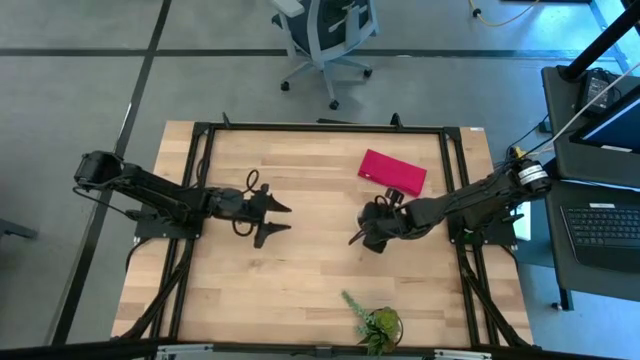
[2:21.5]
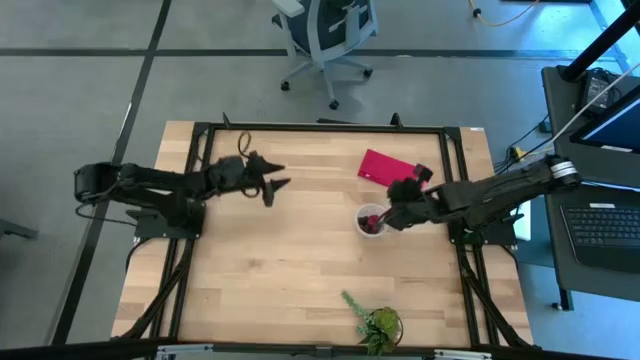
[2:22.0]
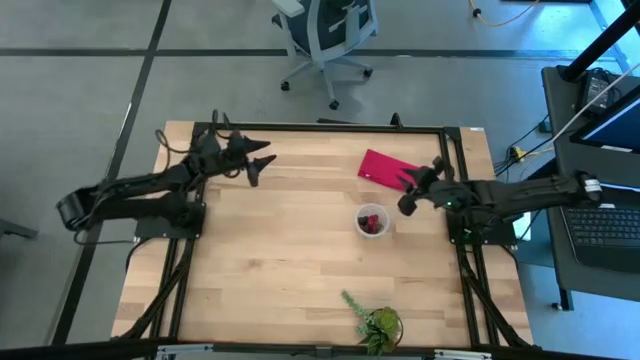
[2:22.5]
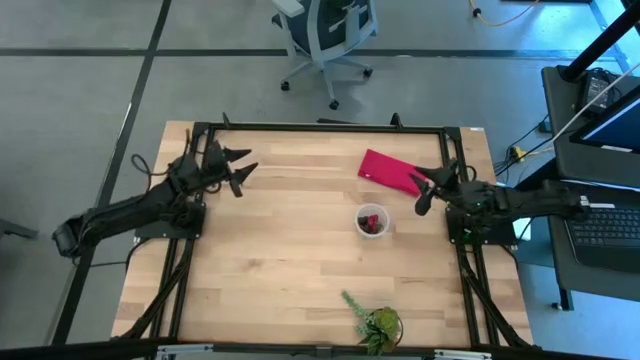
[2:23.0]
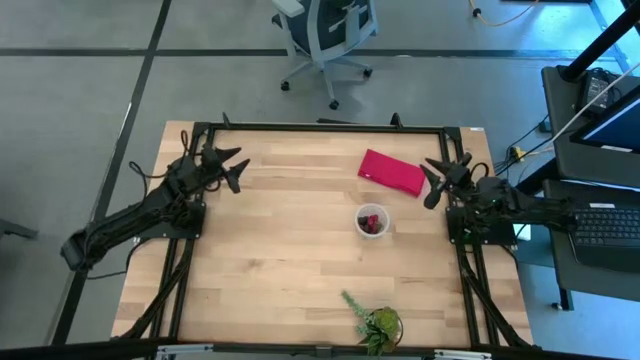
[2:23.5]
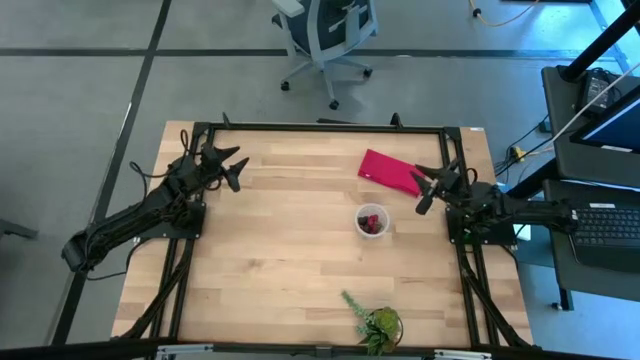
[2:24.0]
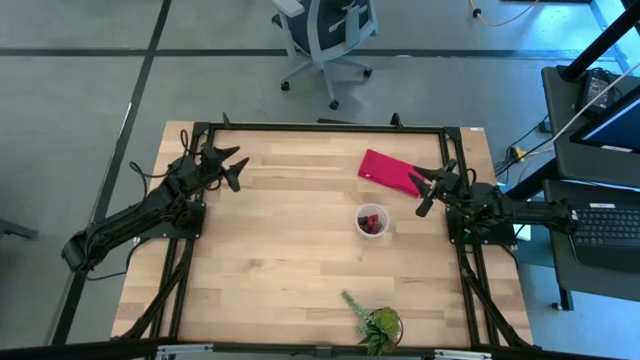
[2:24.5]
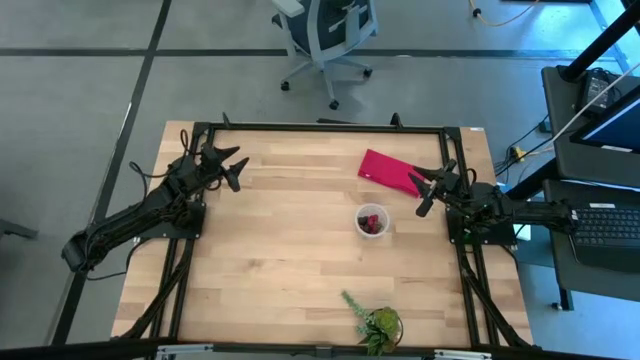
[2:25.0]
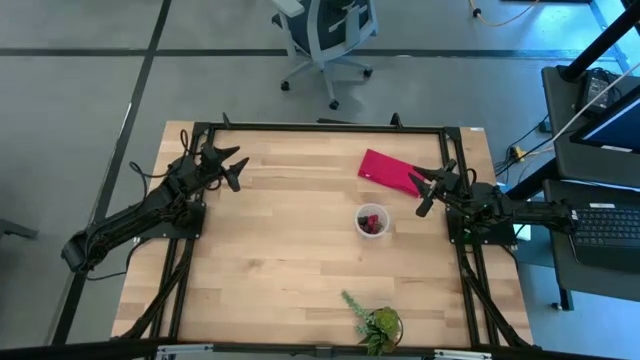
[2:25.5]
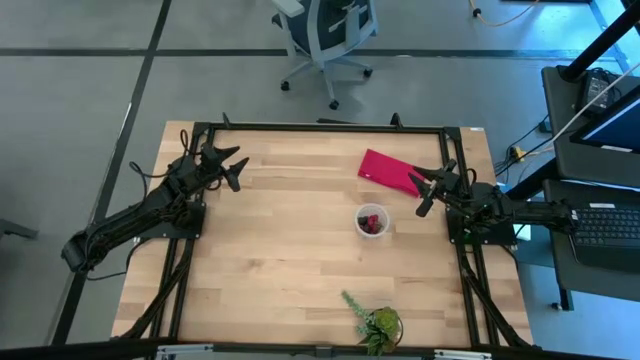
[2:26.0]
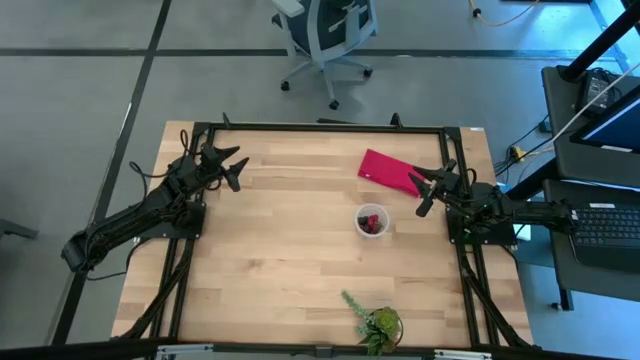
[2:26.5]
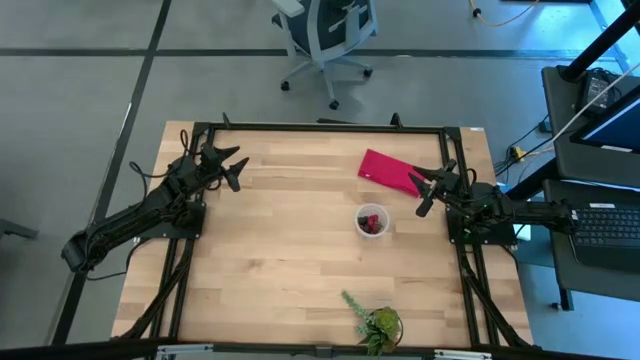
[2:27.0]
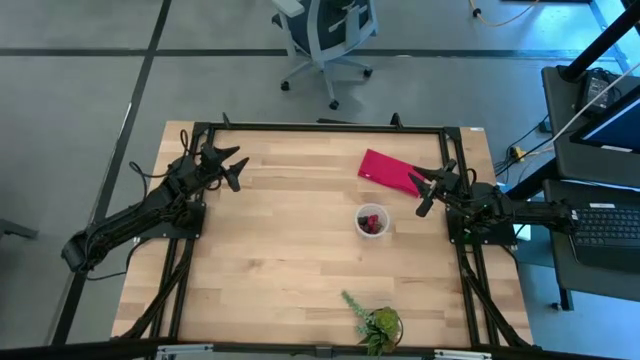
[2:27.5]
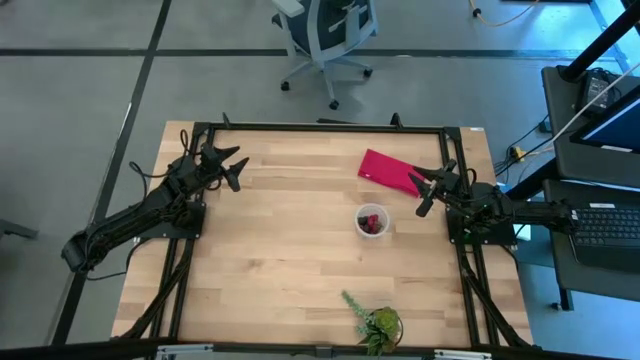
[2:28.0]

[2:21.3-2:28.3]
Task: Pick and placing Produce into tupperware
Return to Home Position

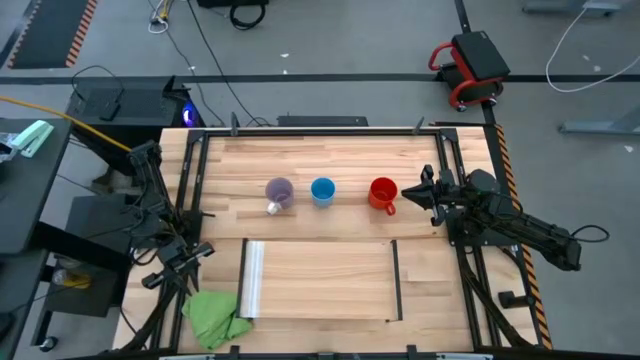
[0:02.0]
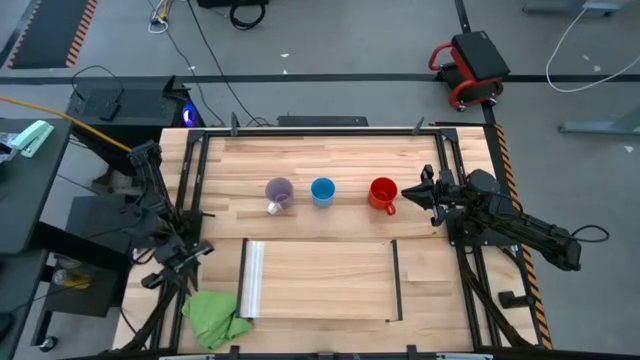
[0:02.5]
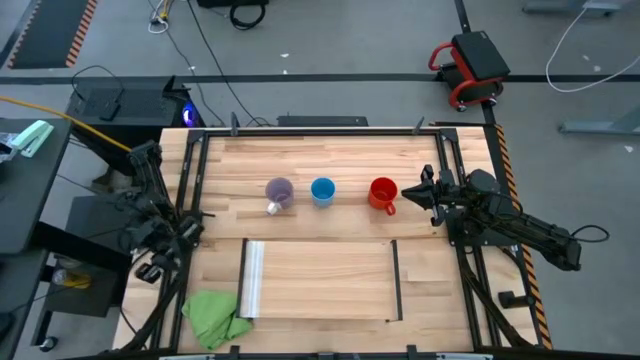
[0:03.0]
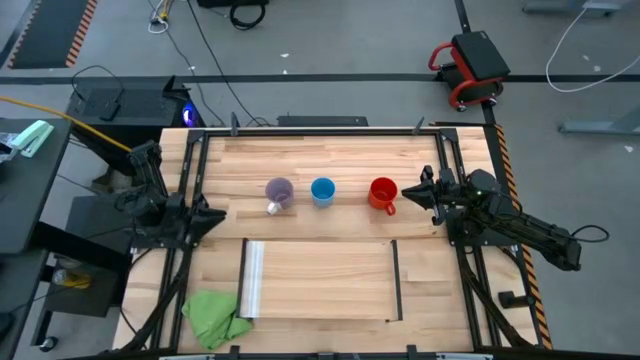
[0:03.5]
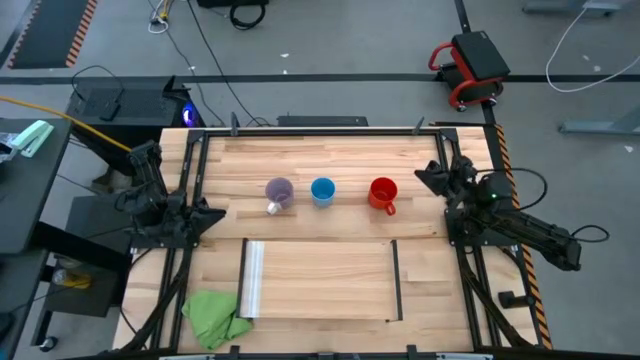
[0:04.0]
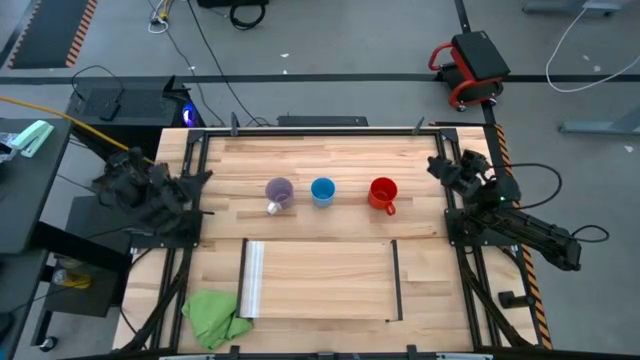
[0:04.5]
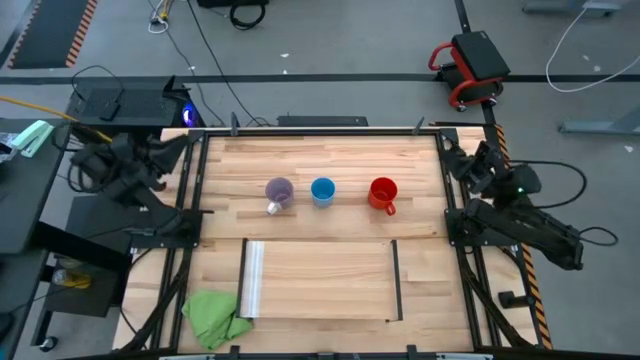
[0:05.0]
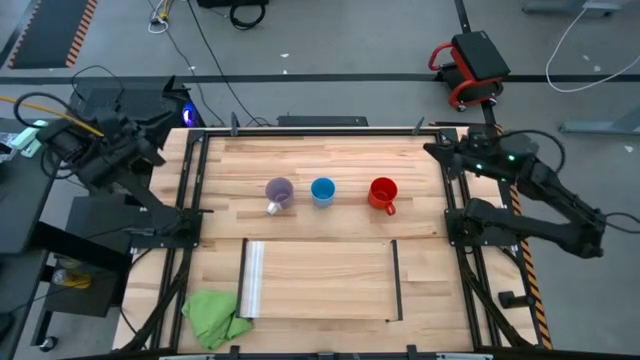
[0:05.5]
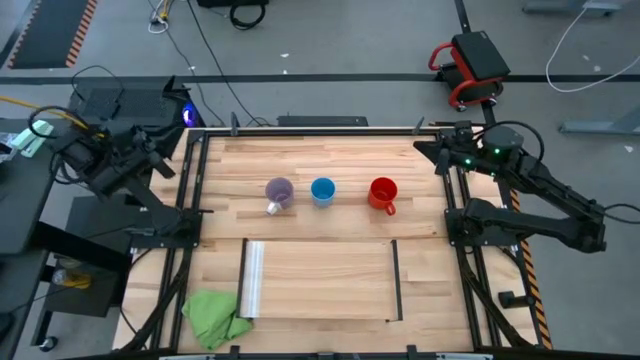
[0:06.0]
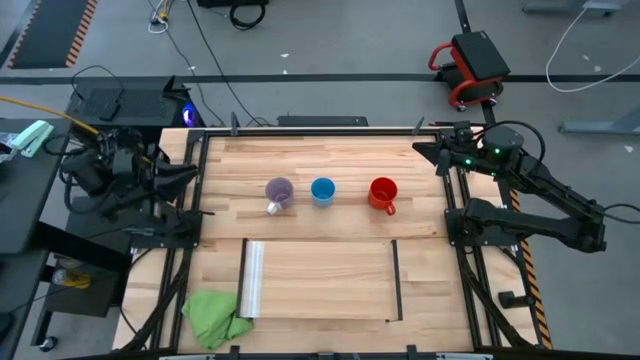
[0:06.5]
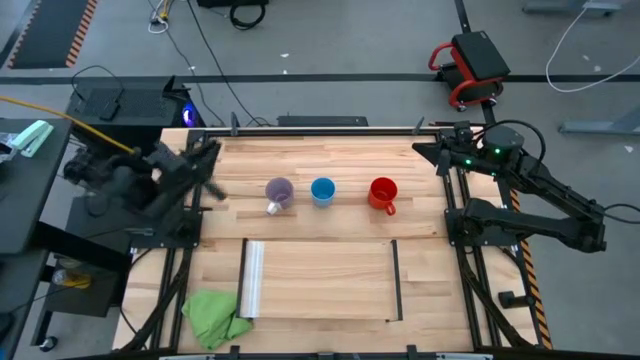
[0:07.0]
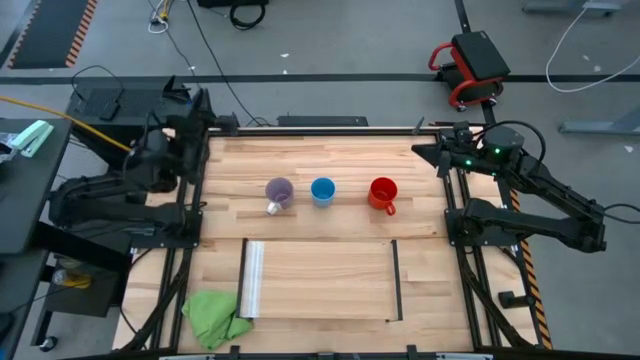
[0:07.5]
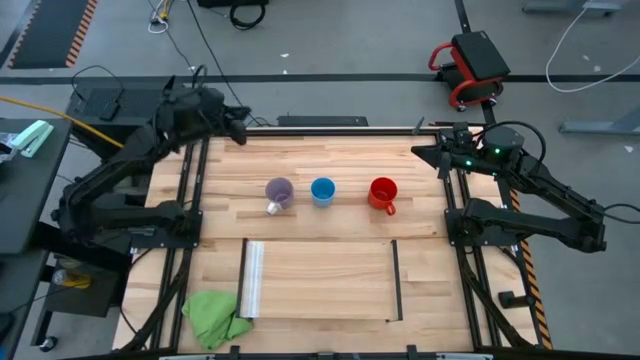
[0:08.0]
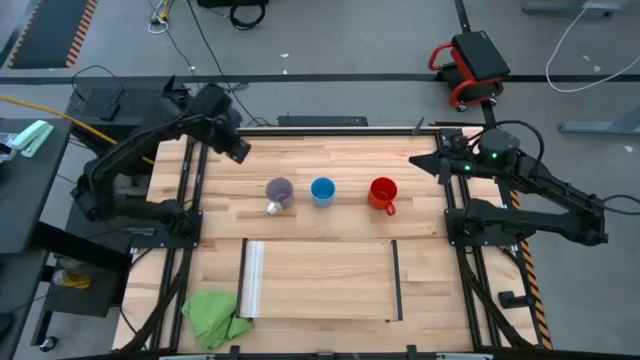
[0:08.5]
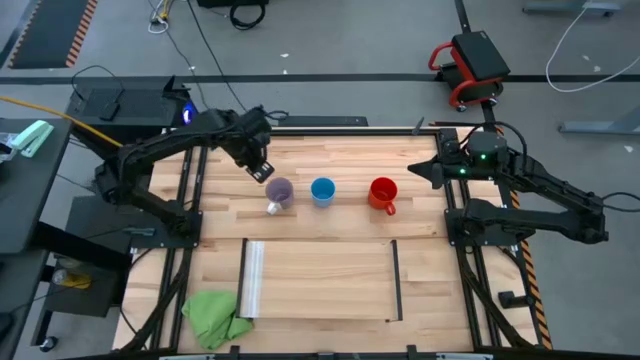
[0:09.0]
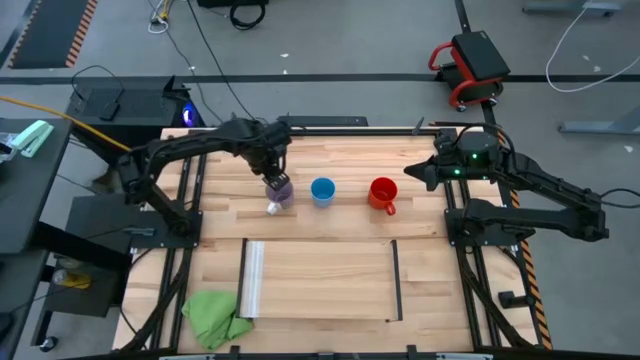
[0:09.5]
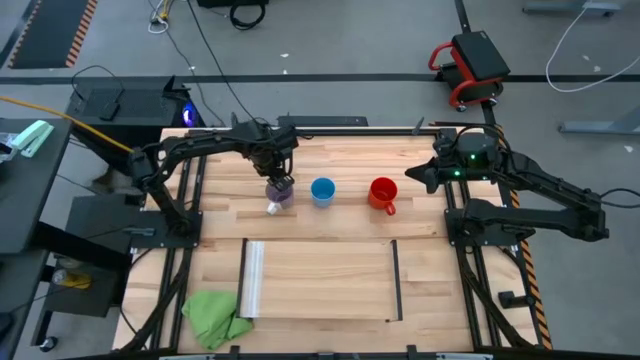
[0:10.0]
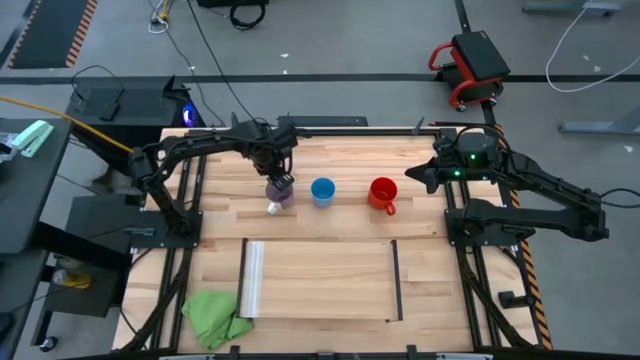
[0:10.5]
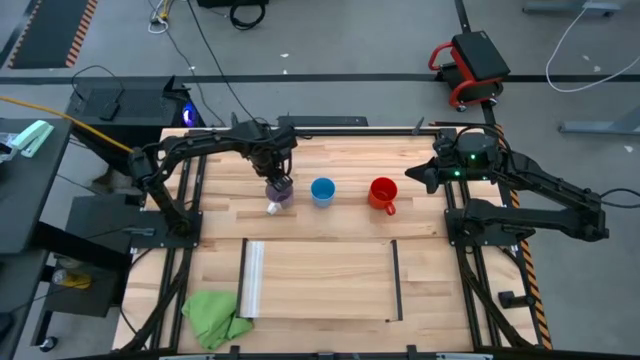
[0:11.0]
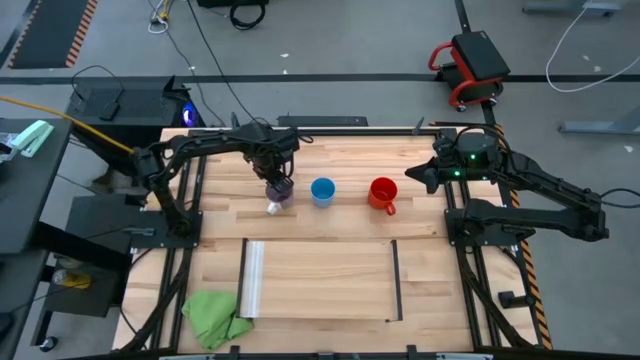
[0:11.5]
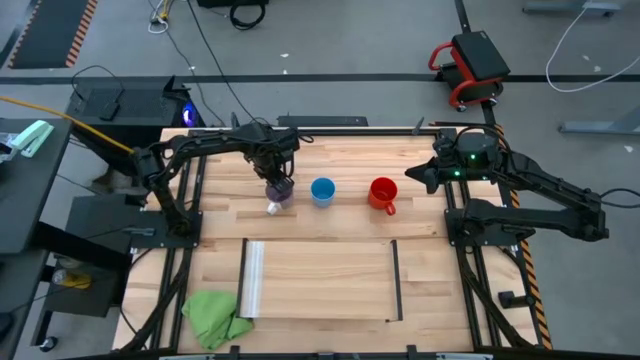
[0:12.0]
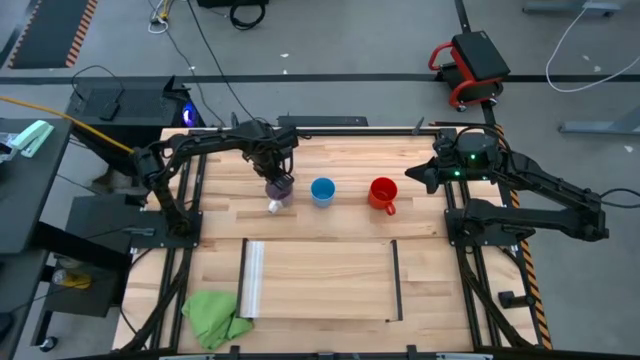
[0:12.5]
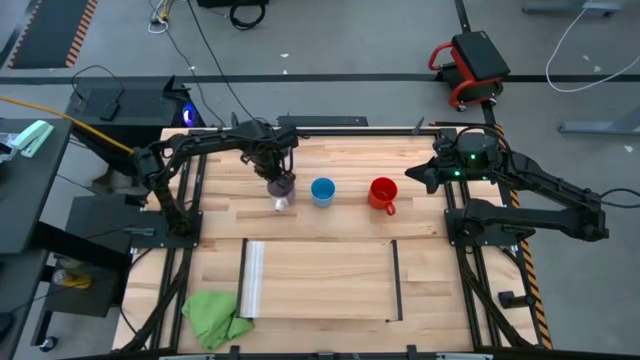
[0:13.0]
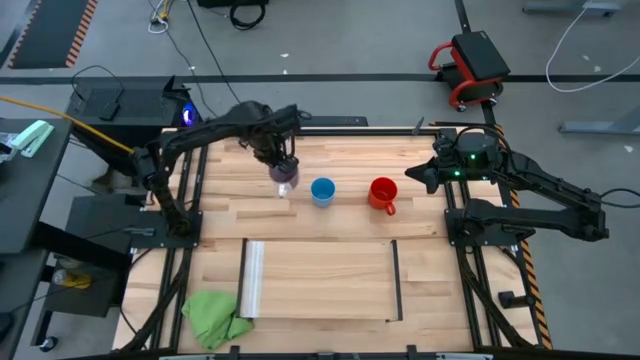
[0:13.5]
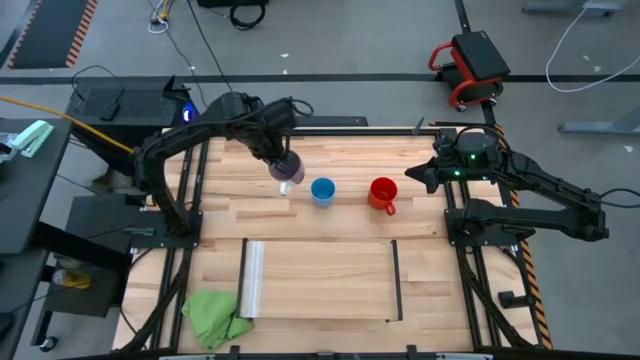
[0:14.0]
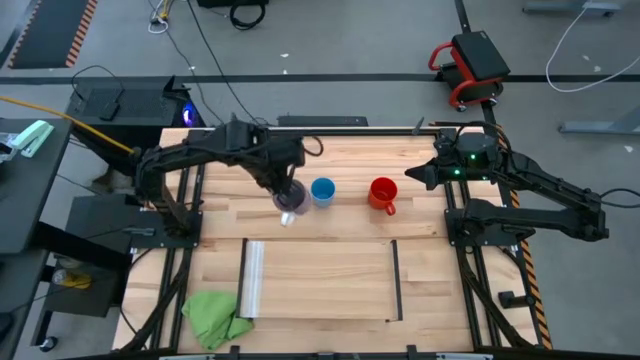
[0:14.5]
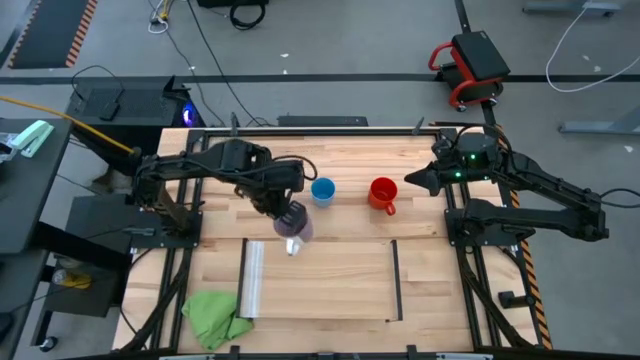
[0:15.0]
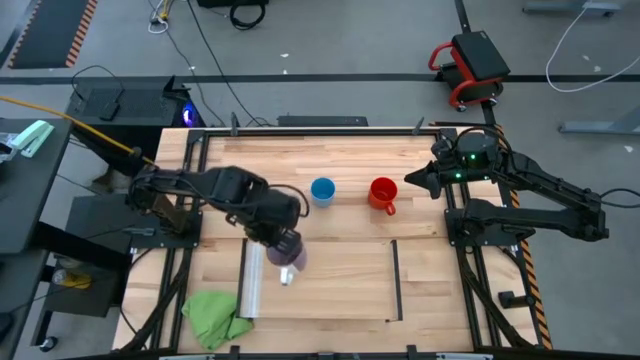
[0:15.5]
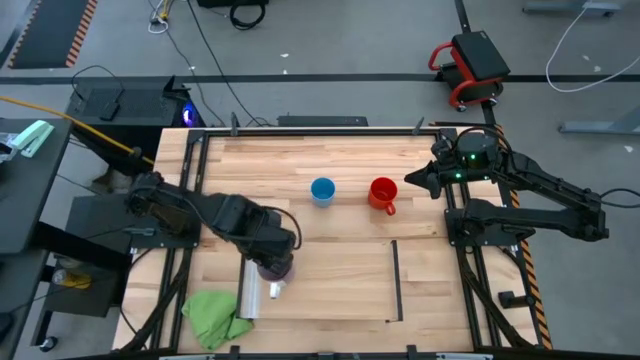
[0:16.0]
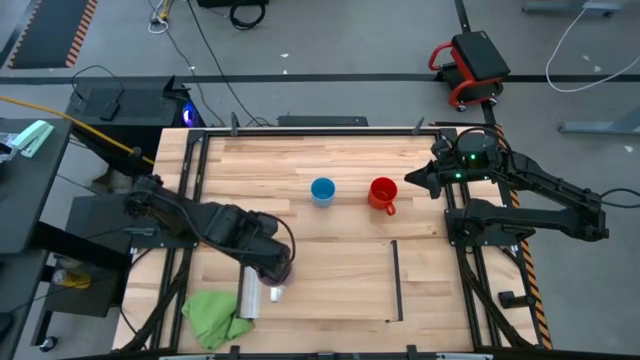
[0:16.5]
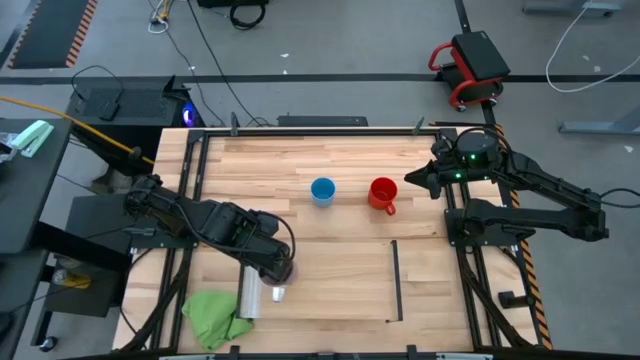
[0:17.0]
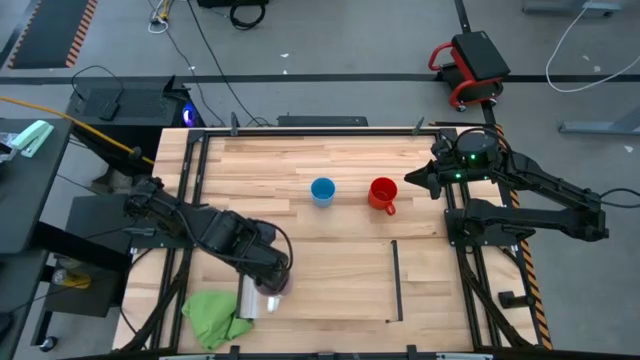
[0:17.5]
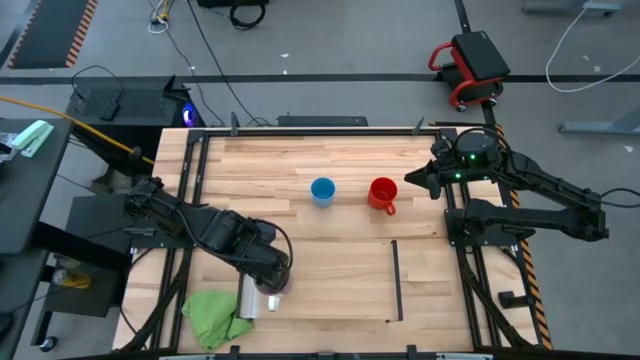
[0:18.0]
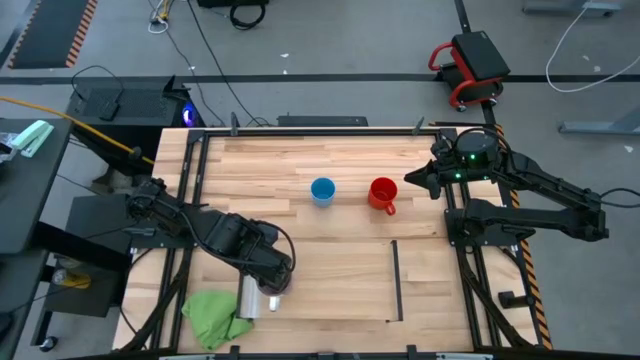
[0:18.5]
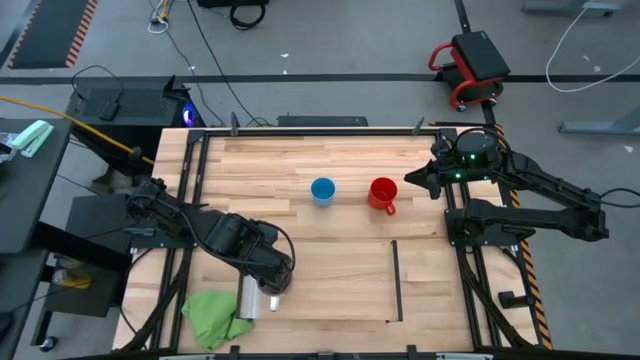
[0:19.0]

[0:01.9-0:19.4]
Task: Stack small to large cups/mugs on shelf
Put the purple mug on the shelf
